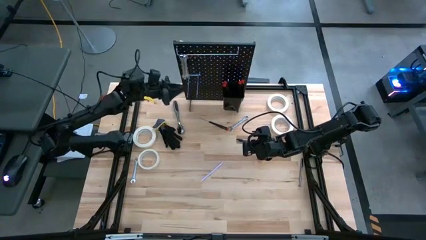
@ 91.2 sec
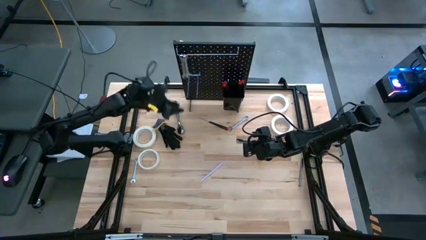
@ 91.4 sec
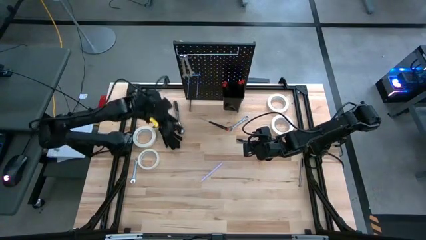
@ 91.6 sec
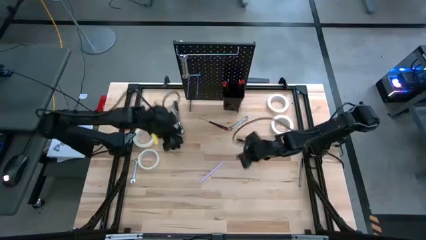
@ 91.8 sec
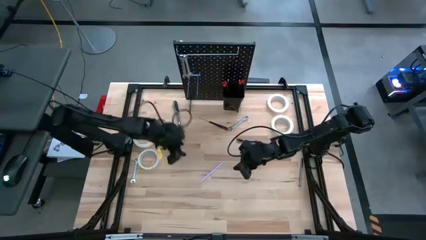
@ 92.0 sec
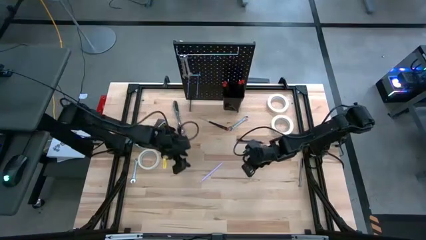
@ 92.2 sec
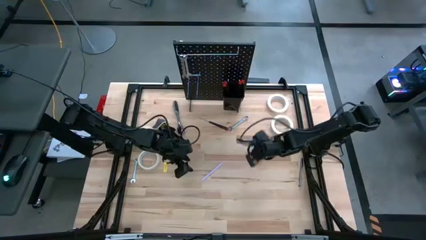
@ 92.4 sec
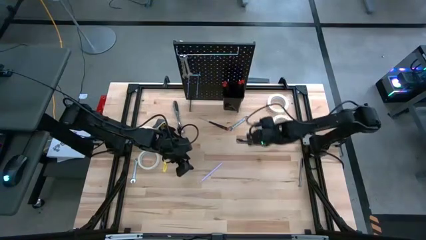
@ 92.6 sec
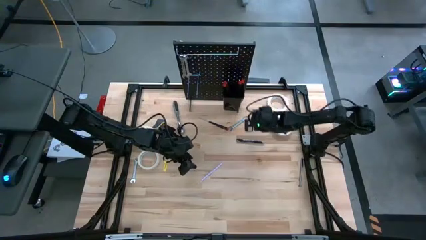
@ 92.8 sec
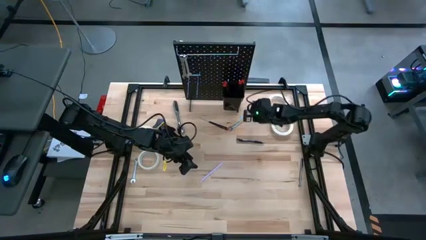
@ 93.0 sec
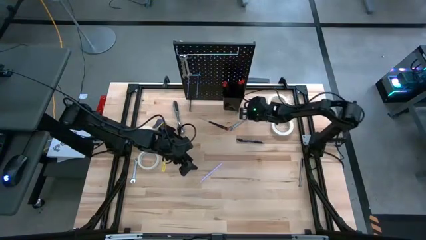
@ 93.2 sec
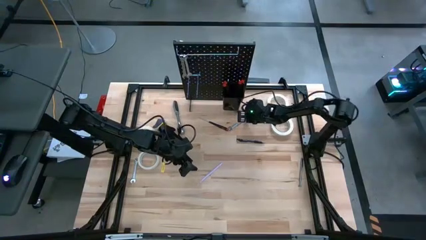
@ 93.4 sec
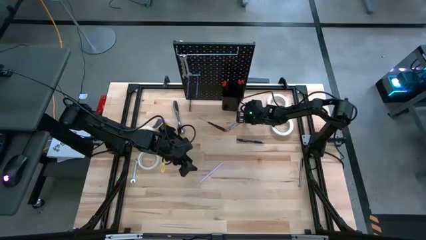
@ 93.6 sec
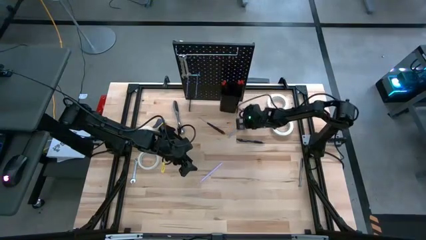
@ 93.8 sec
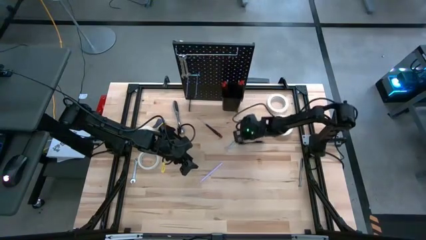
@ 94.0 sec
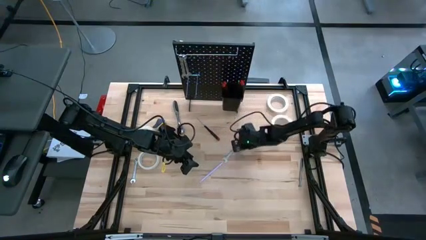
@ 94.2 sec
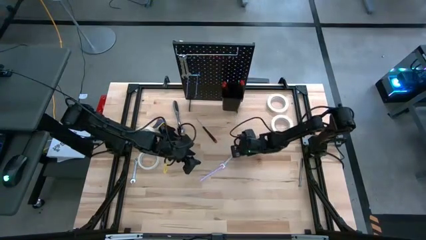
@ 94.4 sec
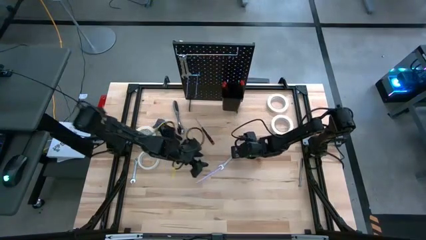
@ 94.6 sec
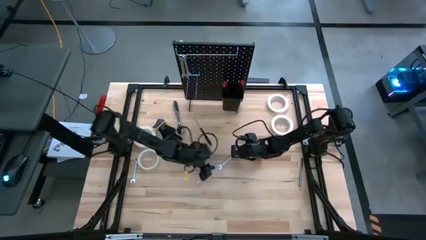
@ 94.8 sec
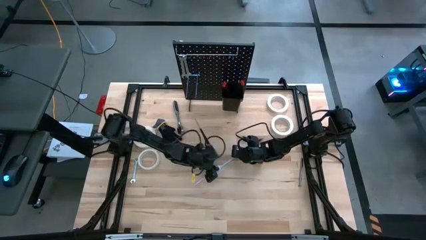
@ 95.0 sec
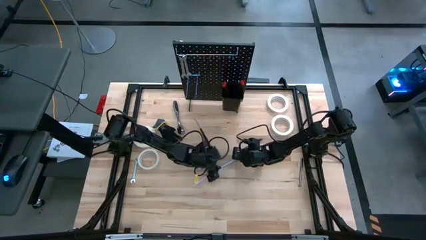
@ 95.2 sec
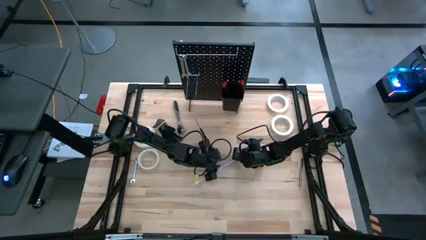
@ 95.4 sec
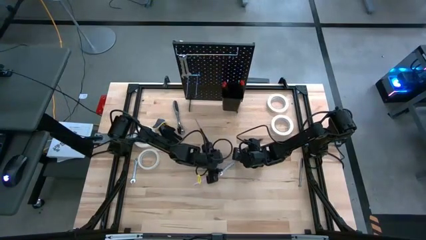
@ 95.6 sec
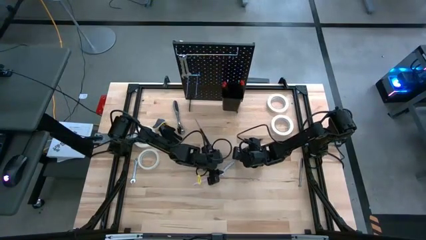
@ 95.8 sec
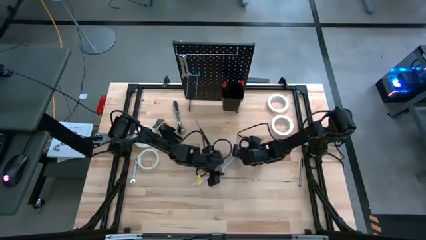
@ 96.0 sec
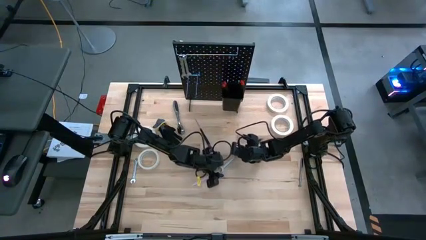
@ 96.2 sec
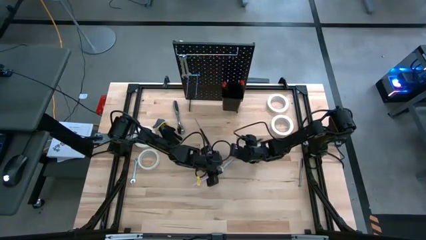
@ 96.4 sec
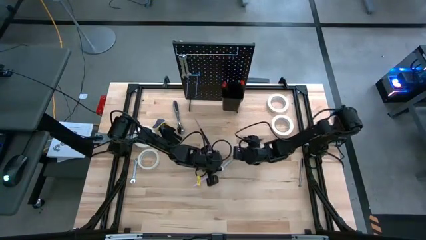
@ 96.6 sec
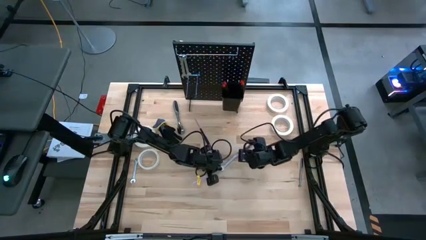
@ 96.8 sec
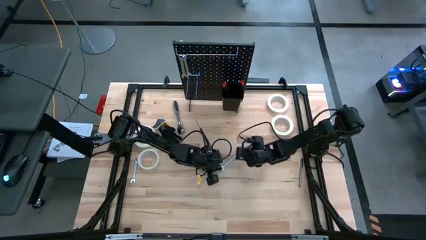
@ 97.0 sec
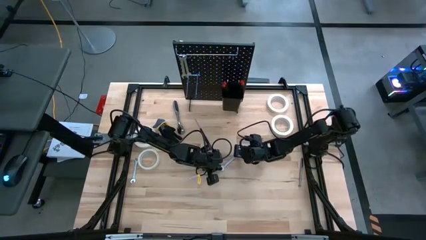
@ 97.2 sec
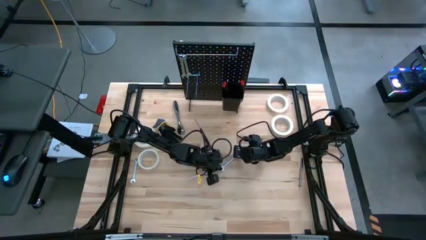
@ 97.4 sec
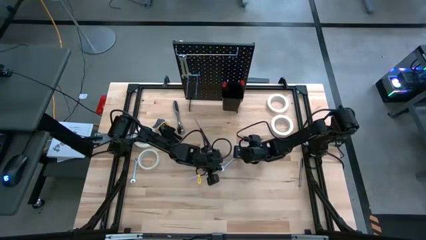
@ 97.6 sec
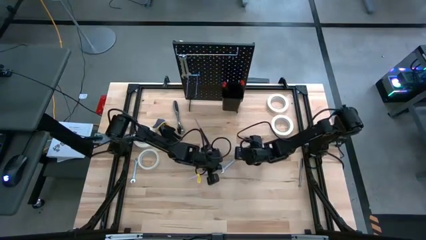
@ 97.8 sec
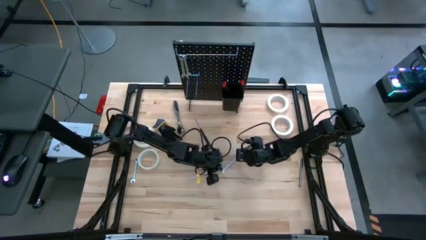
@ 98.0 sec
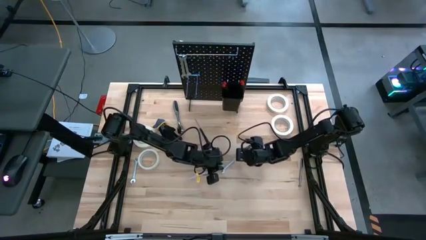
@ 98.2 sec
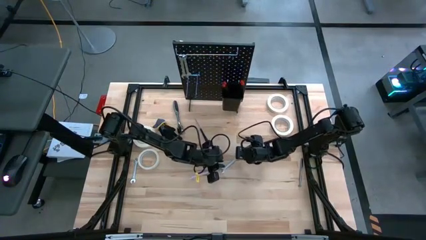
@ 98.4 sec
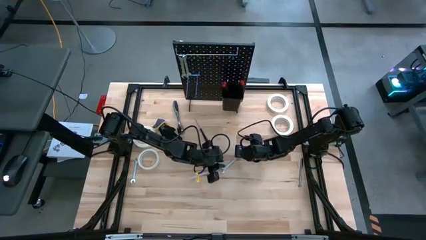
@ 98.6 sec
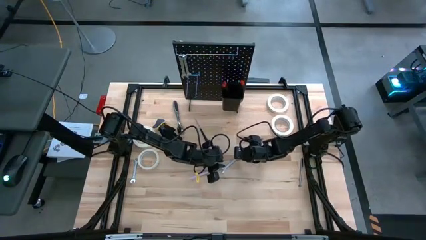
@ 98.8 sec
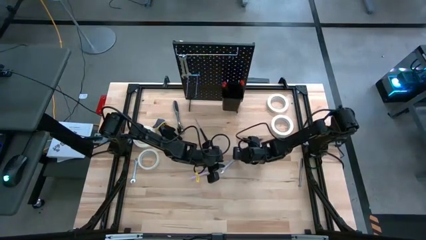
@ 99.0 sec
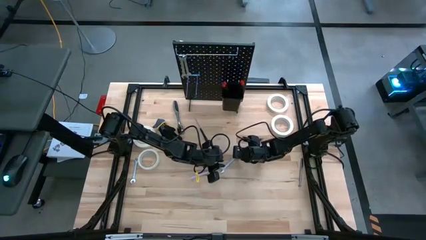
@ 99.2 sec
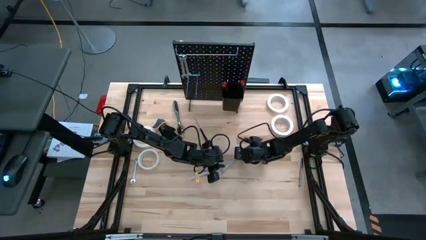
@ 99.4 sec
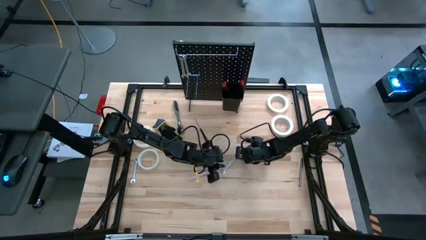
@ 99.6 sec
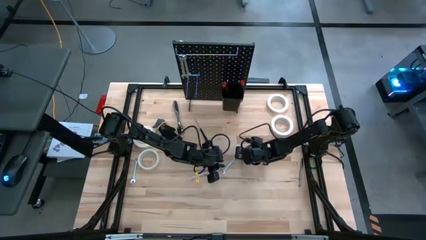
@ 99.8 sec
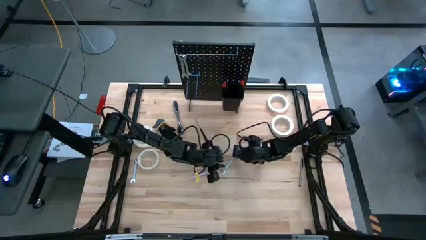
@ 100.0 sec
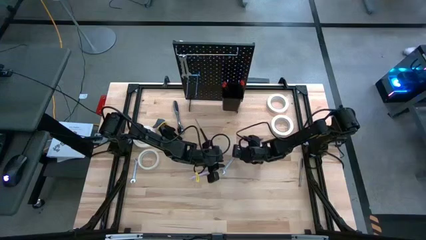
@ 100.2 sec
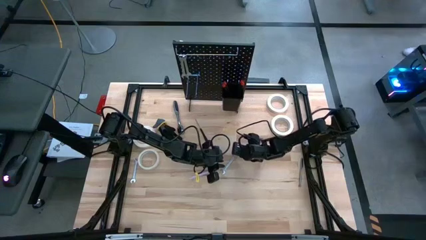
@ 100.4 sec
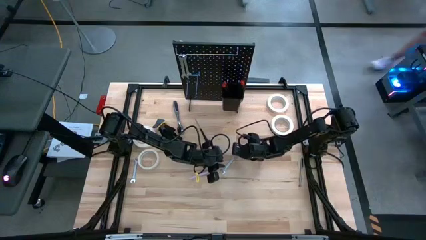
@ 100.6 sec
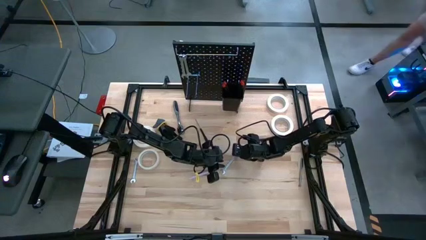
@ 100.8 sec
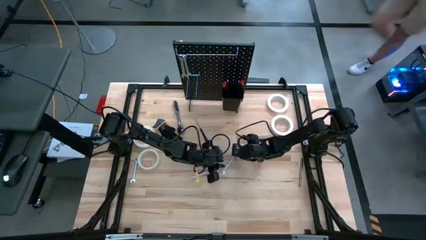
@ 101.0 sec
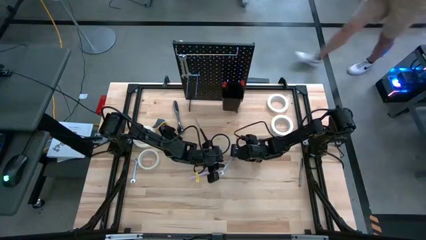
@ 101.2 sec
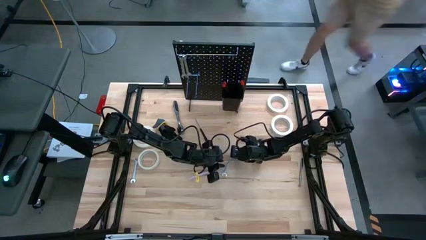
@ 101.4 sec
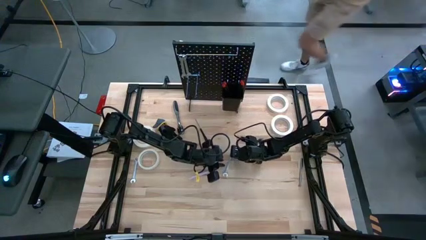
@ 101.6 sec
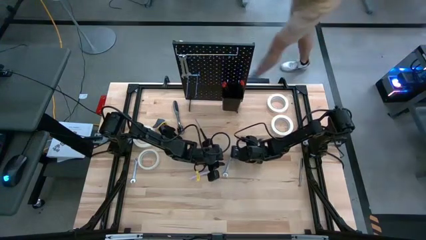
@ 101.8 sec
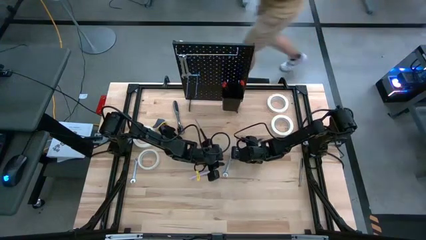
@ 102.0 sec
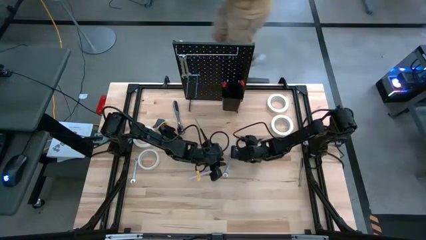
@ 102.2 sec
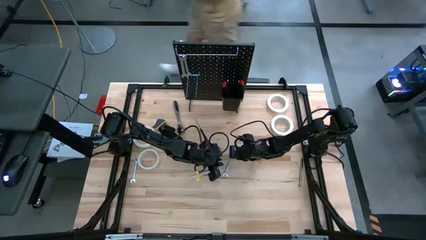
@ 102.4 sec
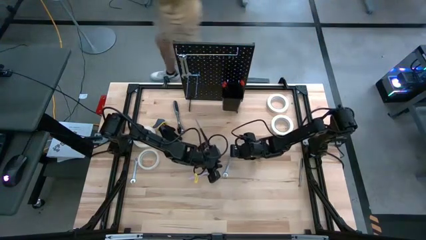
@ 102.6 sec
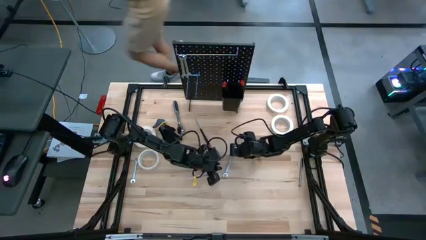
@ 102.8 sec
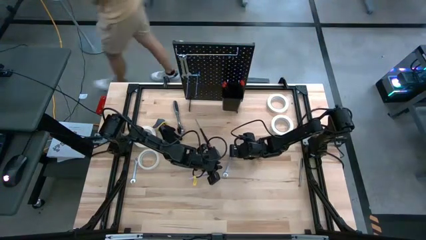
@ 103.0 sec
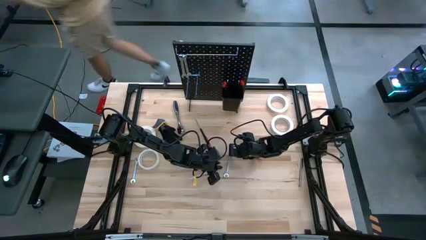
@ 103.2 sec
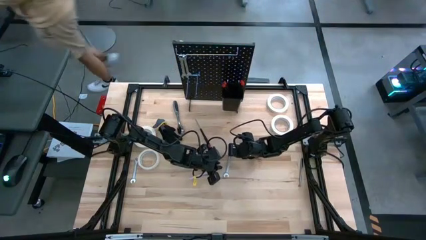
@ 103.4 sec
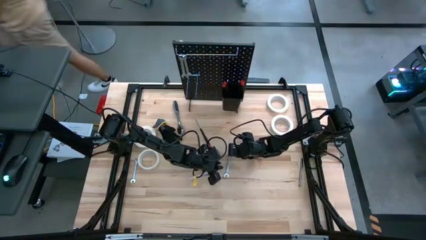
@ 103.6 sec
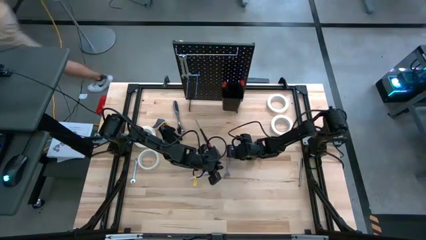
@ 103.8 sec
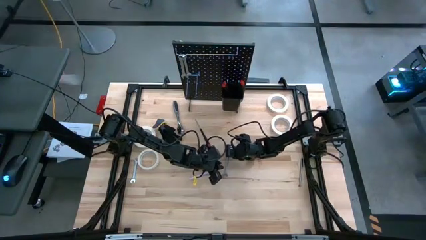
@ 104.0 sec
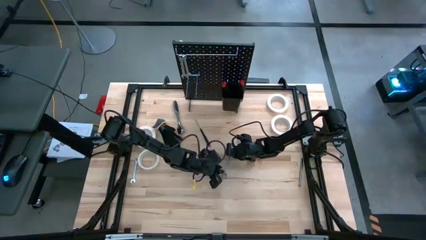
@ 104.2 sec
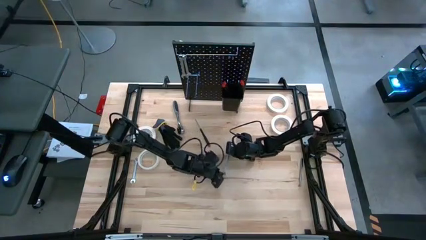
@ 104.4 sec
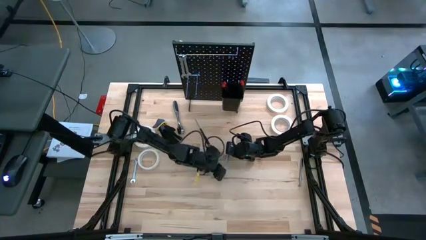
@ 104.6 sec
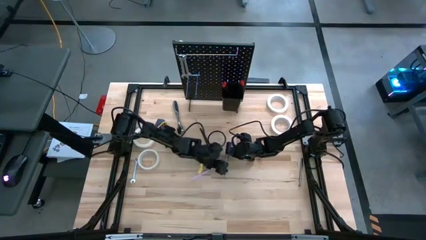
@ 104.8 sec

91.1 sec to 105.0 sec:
Task: Hang tools onto peg board
Hang the wrench onto the peg board
